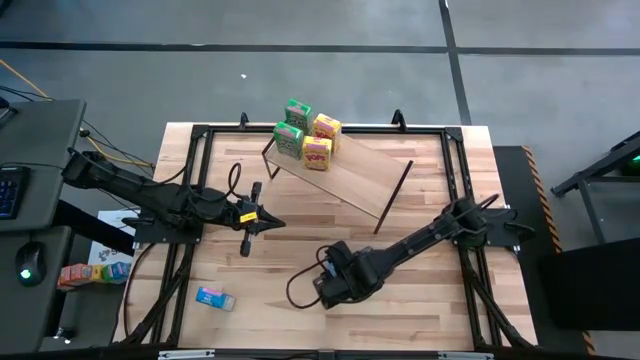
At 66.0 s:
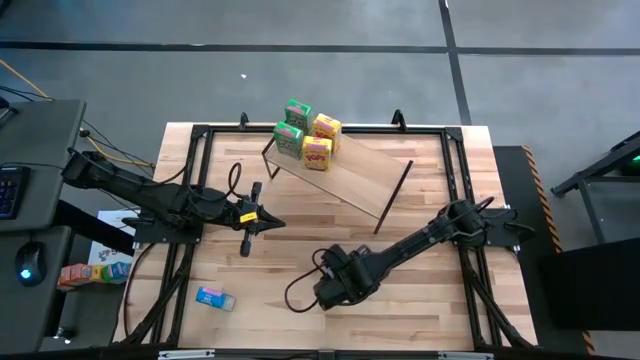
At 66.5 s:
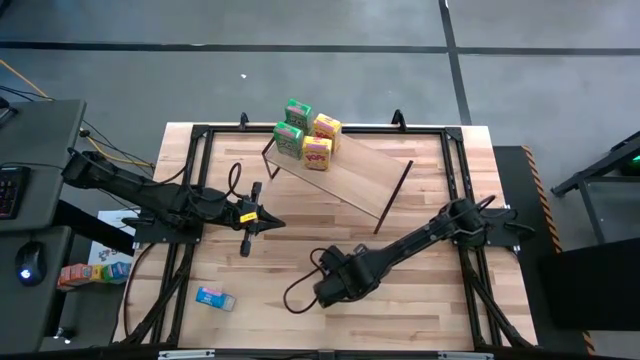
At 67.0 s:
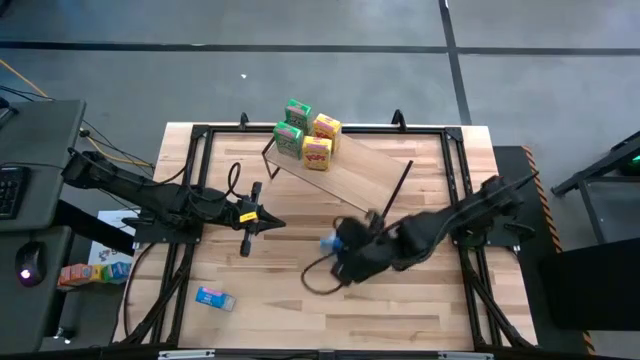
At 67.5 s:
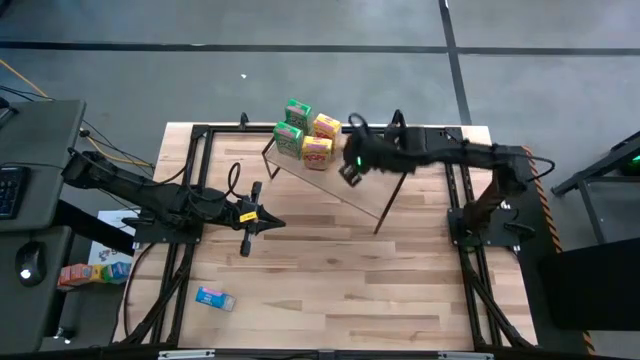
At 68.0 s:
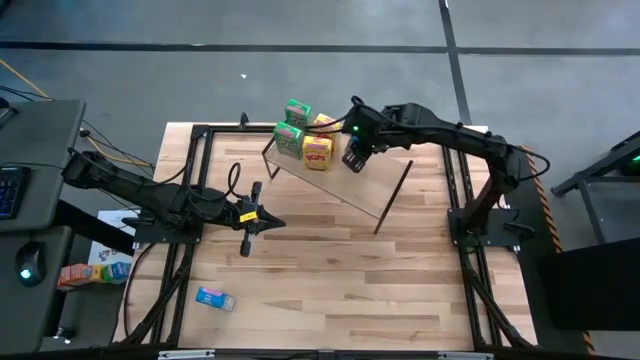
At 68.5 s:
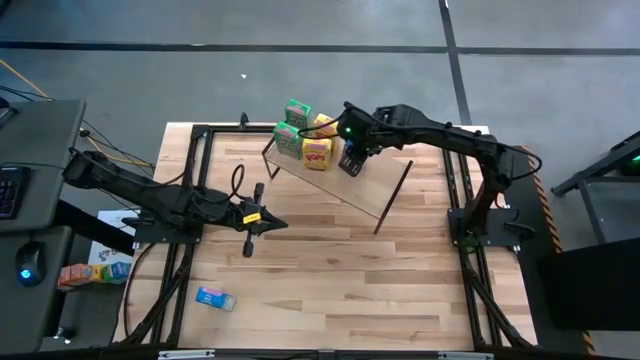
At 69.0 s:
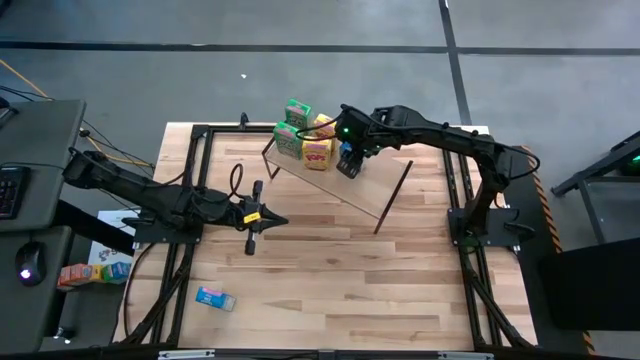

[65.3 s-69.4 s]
Task: Stack cereal on shelf
Put the right blue cereal box on the shelf

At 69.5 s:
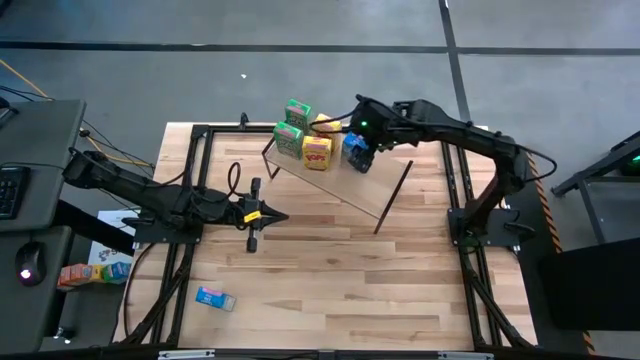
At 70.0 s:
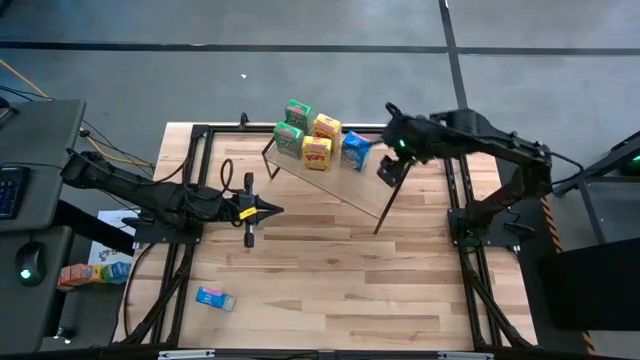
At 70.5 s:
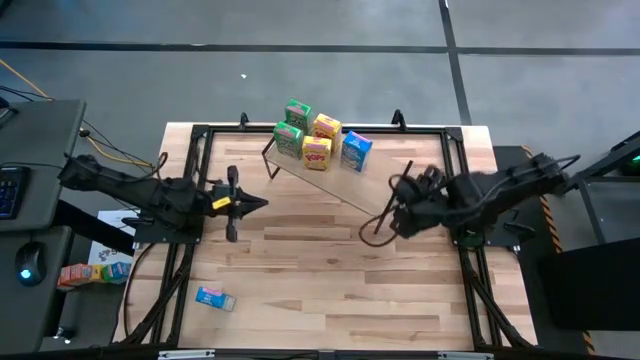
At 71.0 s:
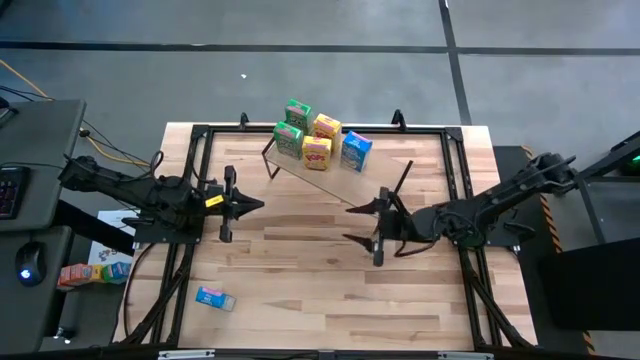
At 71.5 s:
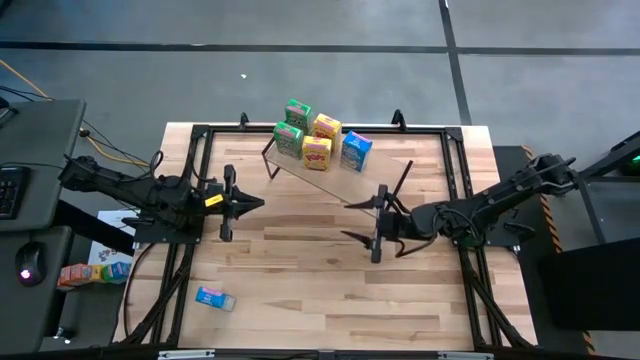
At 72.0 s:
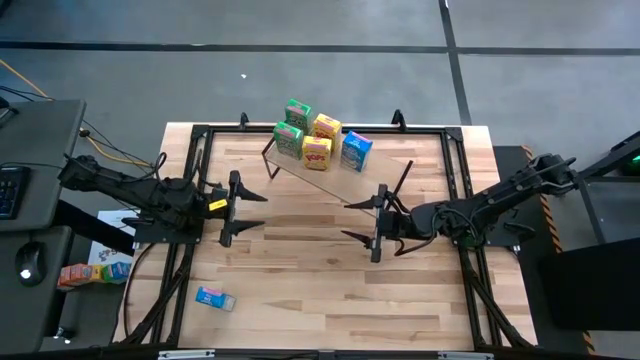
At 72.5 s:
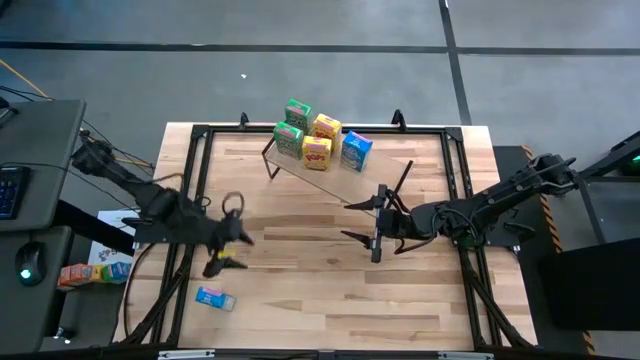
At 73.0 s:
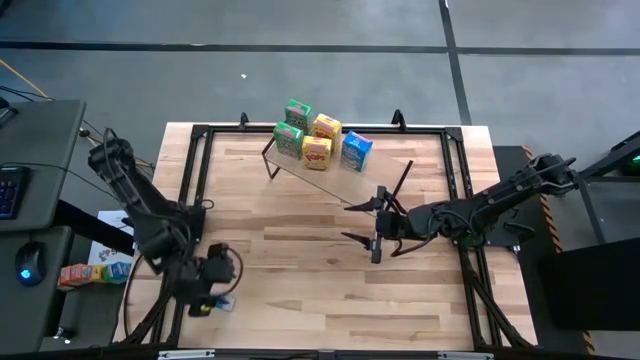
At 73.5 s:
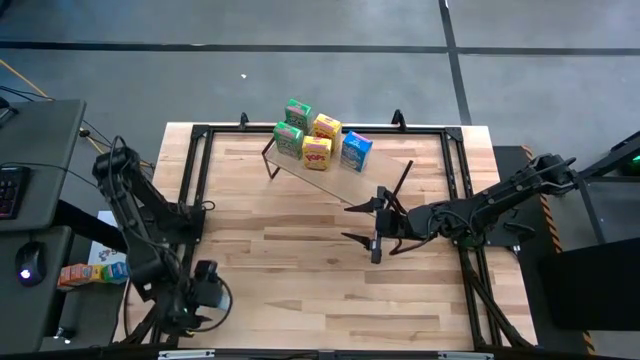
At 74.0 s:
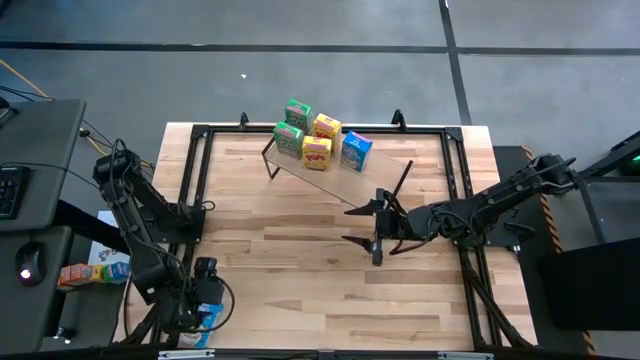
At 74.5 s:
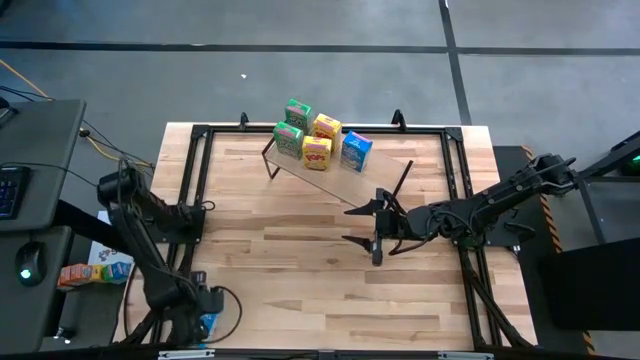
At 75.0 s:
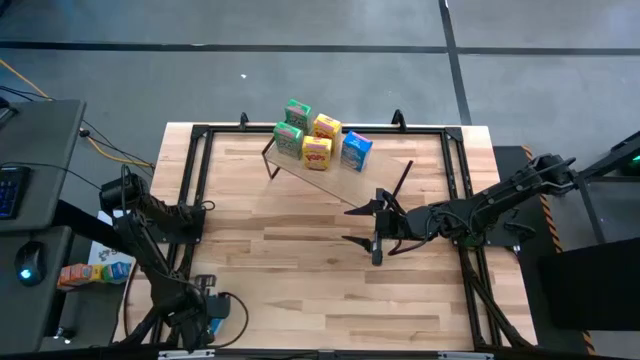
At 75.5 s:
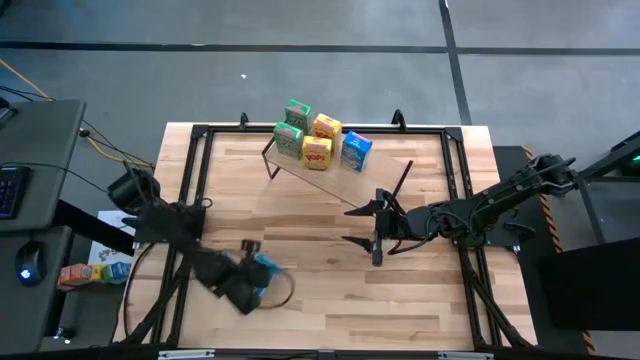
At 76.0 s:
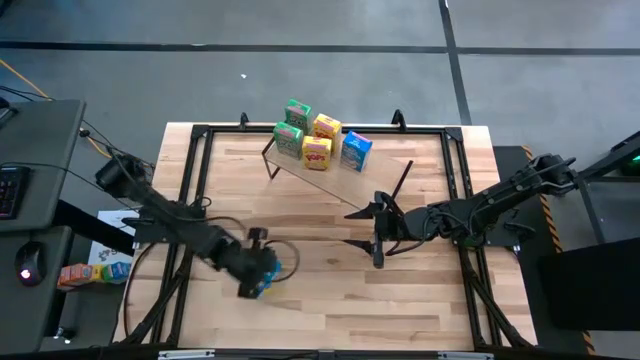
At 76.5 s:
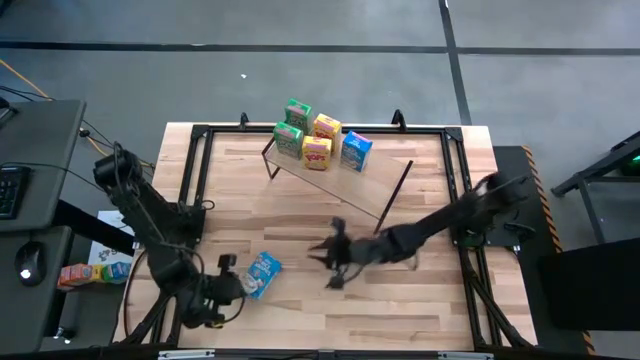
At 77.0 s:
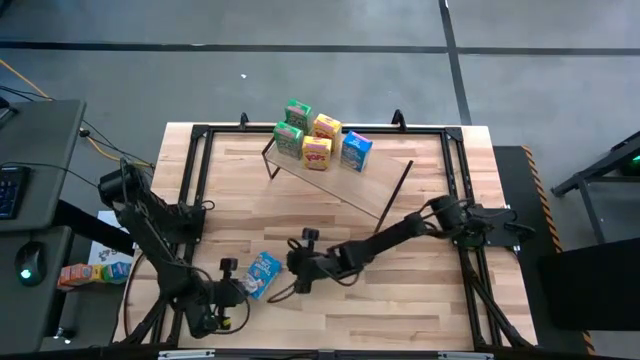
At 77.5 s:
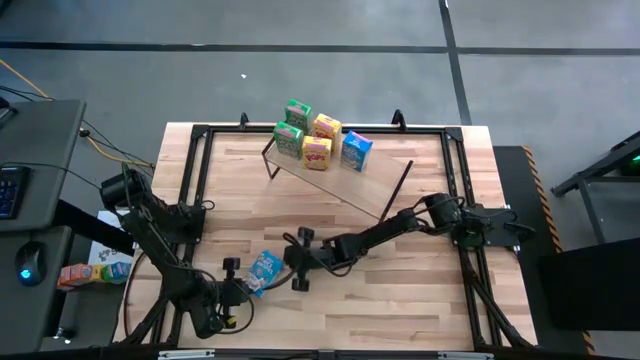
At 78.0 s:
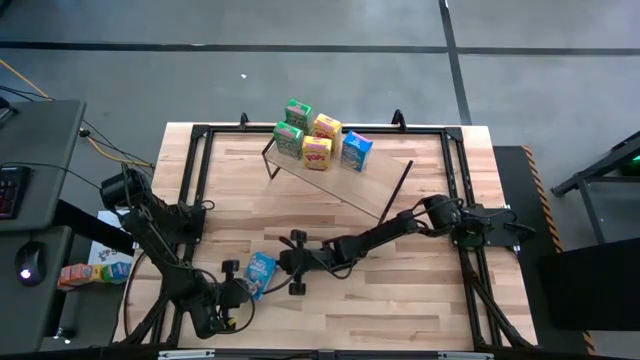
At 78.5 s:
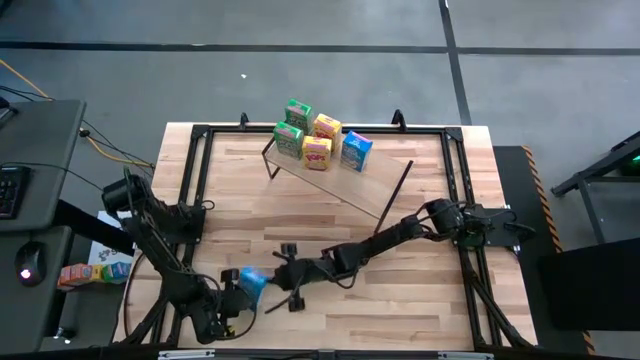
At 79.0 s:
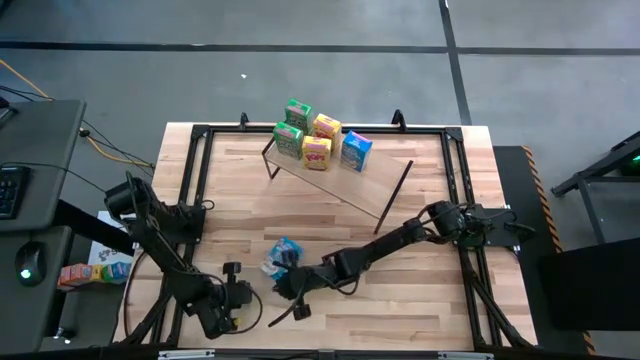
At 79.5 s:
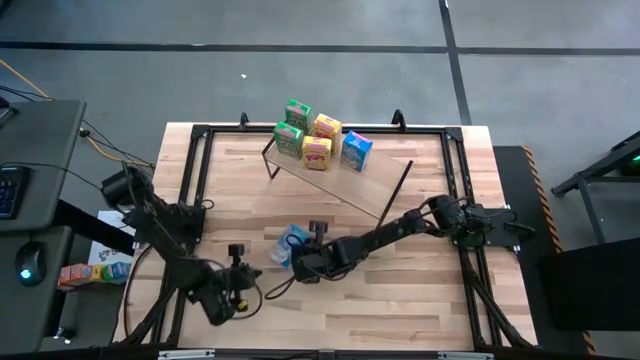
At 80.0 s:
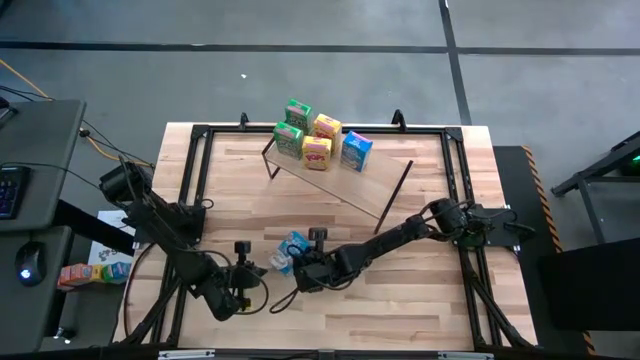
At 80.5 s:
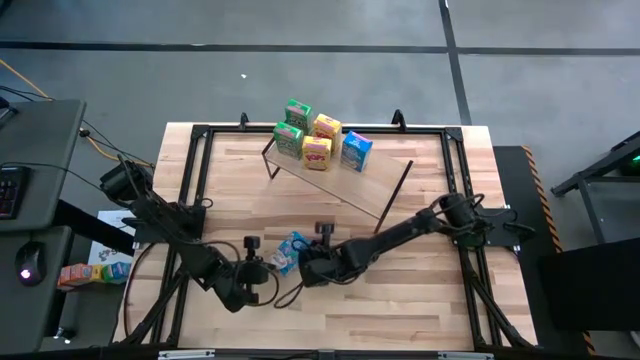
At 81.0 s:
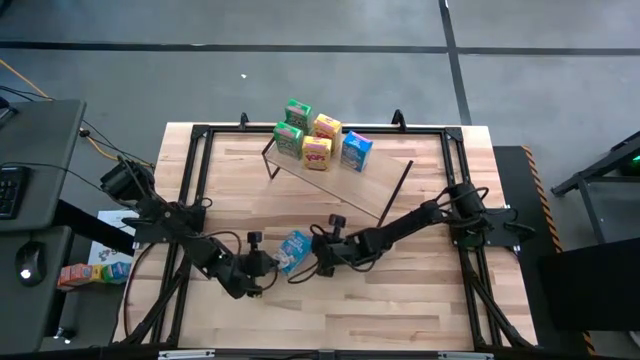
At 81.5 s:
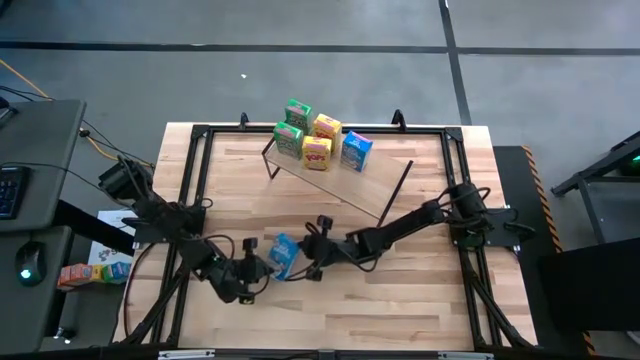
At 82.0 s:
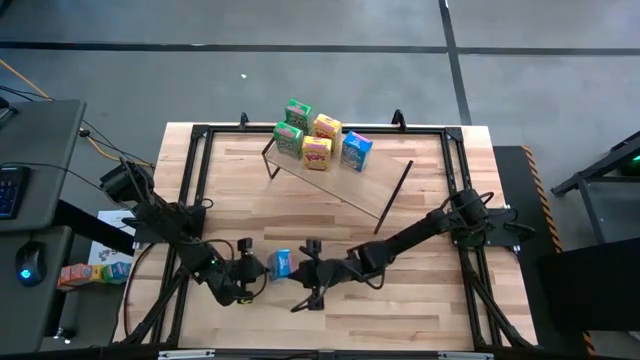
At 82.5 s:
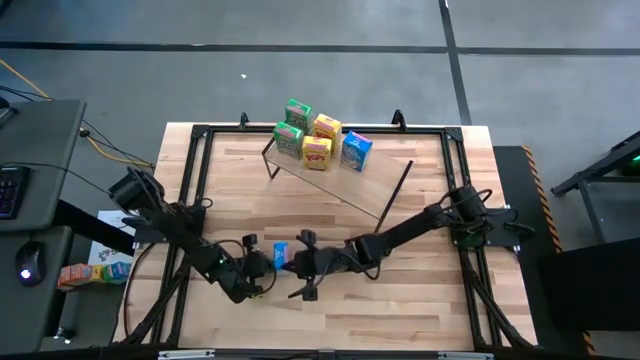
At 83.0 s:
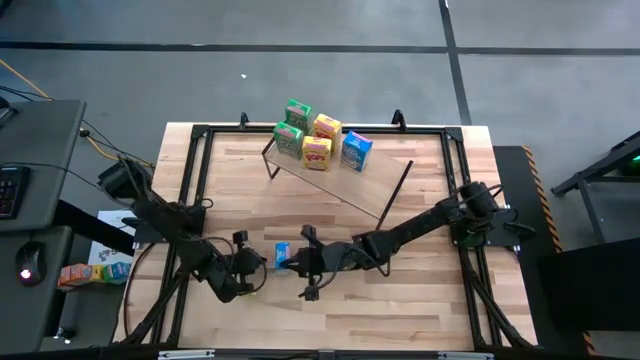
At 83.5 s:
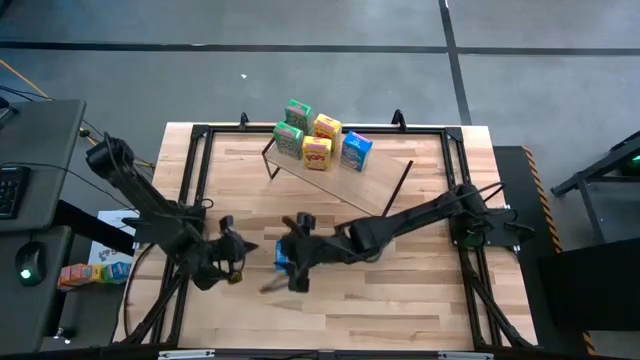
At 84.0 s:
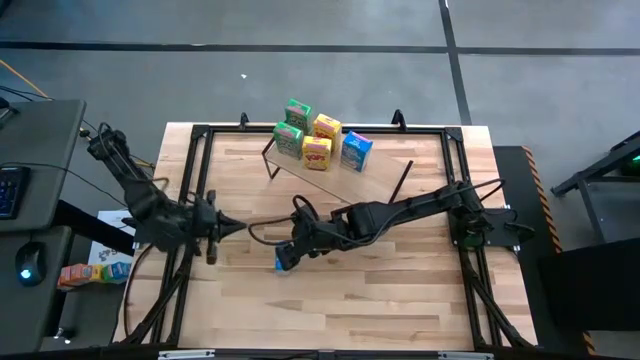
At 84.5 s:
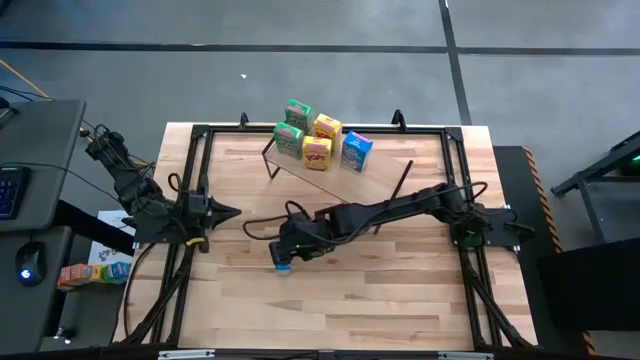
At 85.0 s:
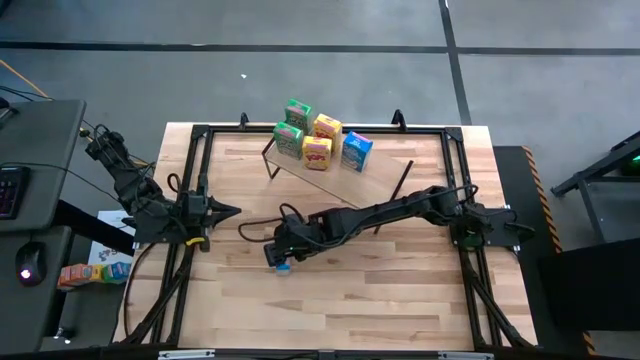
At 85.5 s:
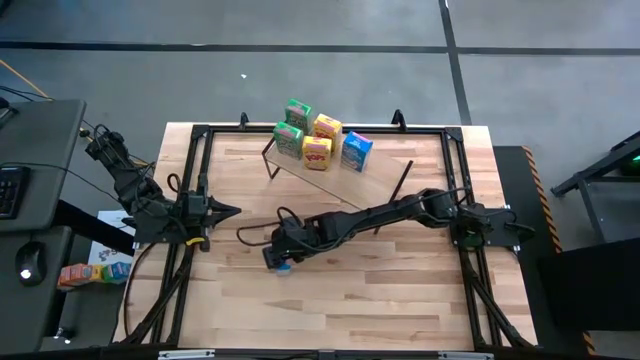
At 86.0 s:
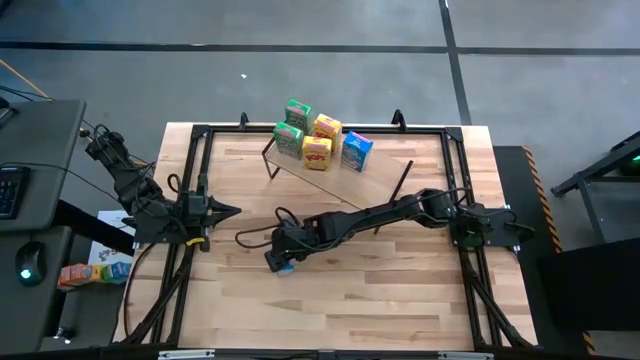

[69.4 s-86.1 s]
Put the blue cereal box aligned with the blue cereal box on the shelf

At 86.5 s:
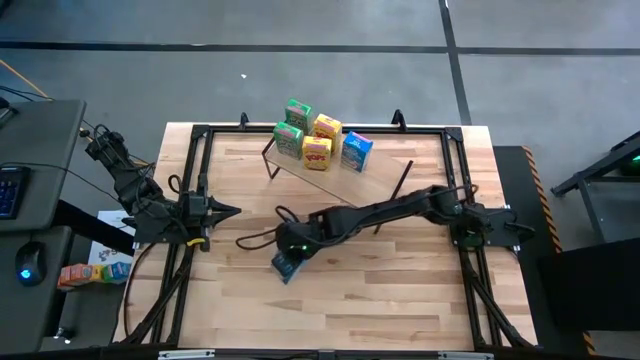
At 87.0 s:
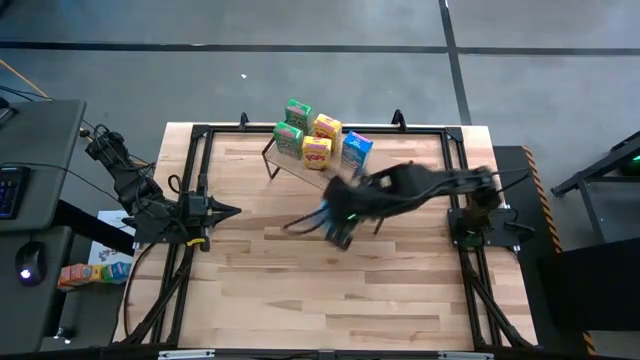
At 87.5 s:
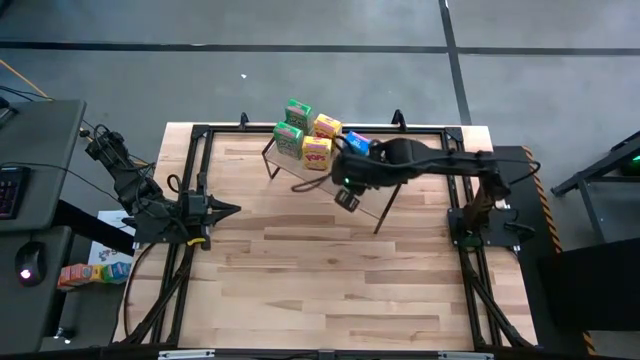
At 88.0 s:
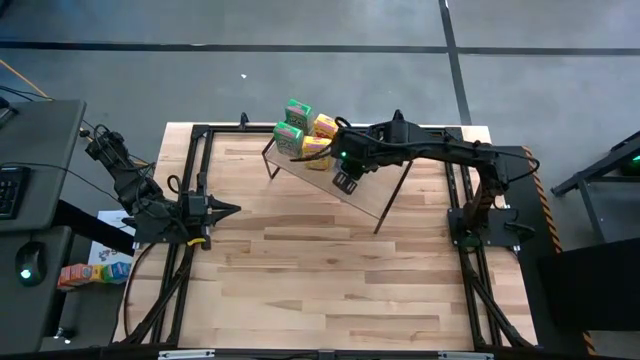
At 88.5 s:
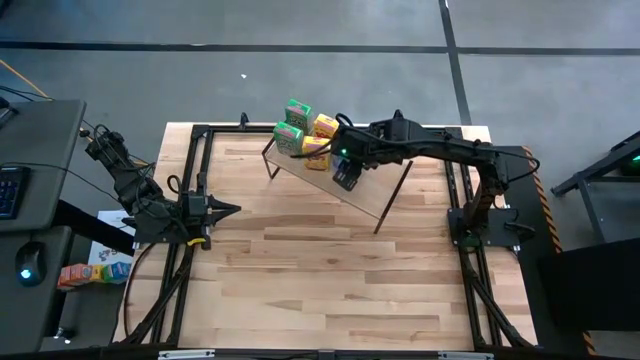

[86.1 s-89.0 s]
Put the blue cereal box aligned with the blue cereal box on the shelf
